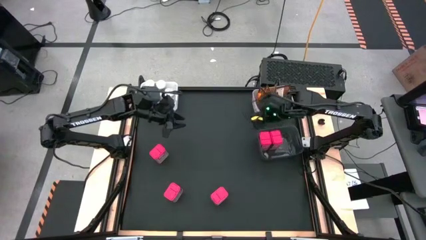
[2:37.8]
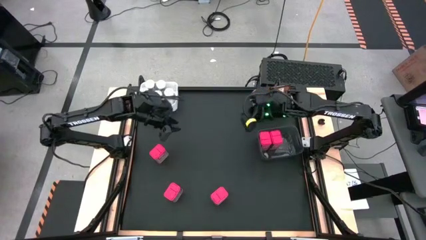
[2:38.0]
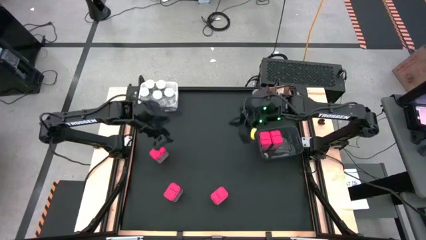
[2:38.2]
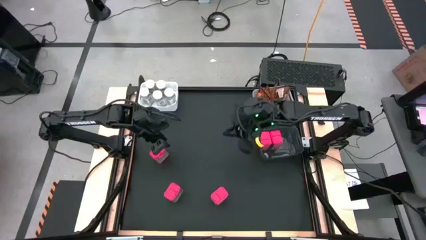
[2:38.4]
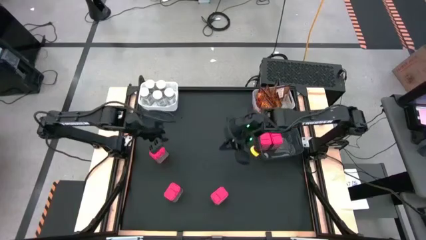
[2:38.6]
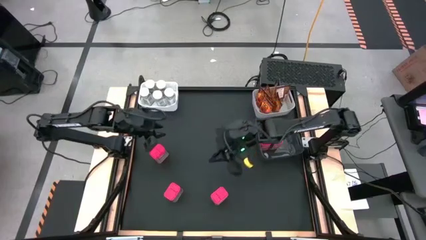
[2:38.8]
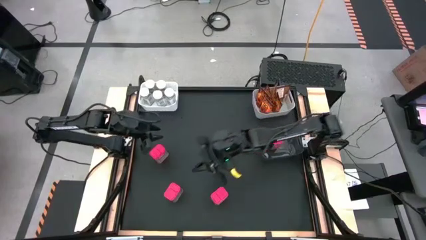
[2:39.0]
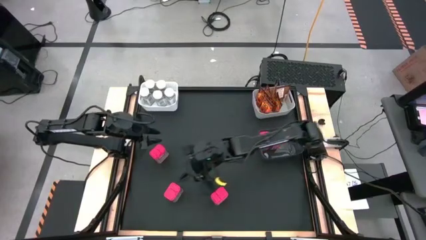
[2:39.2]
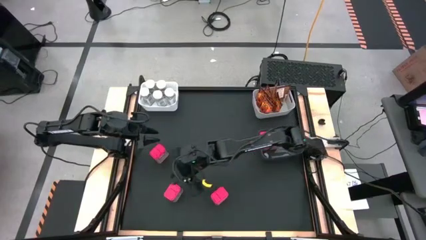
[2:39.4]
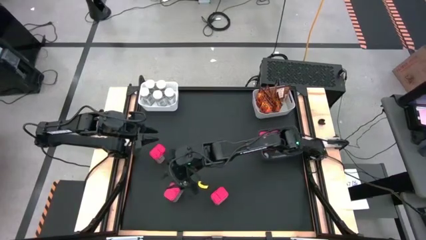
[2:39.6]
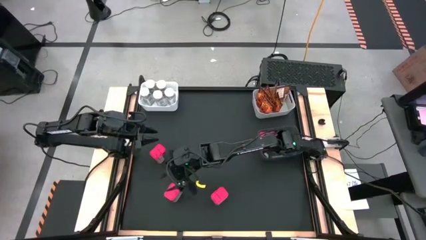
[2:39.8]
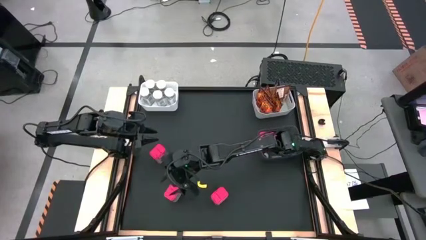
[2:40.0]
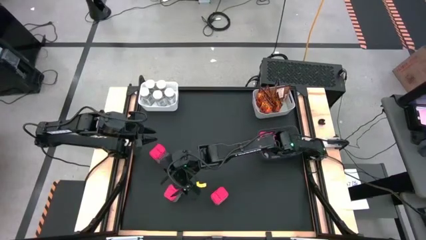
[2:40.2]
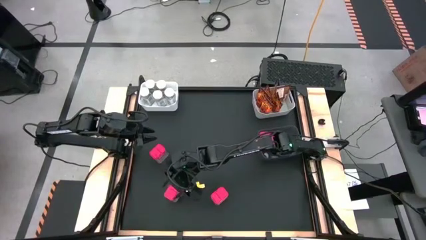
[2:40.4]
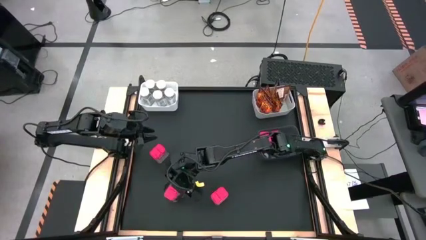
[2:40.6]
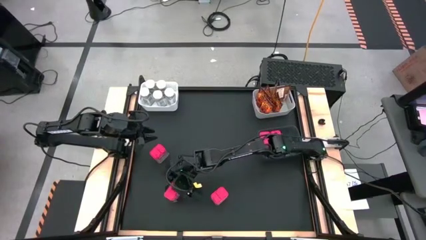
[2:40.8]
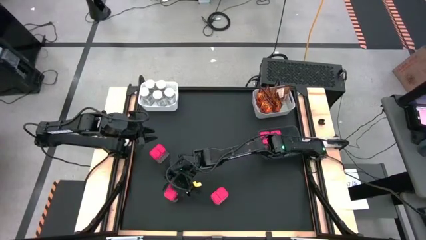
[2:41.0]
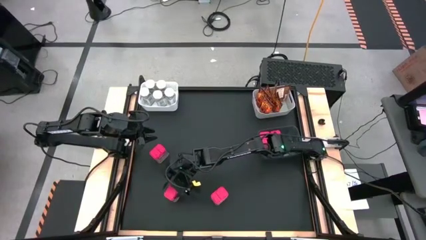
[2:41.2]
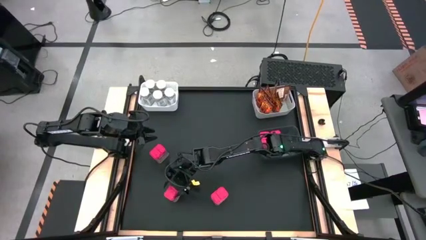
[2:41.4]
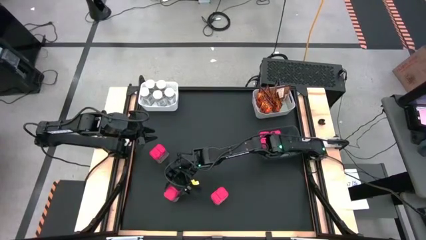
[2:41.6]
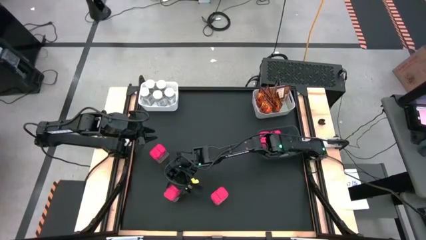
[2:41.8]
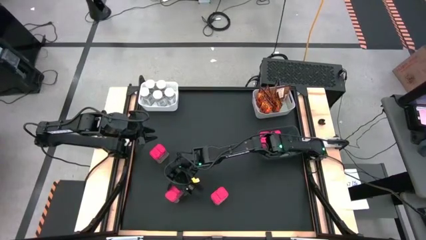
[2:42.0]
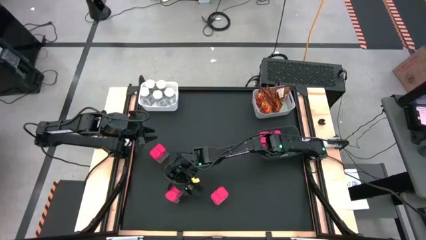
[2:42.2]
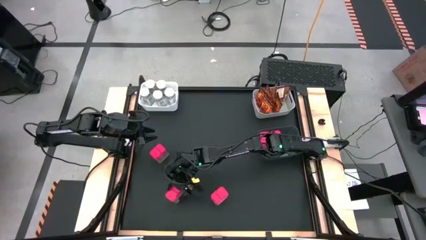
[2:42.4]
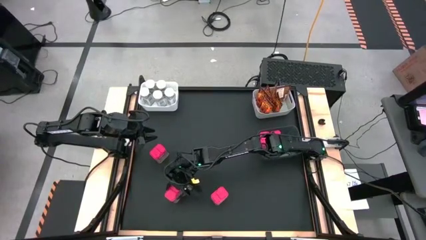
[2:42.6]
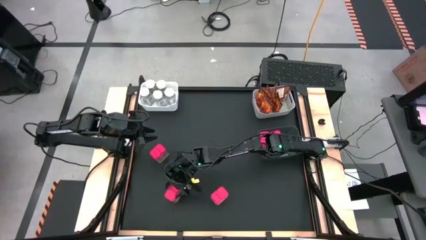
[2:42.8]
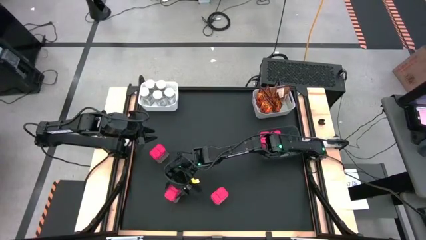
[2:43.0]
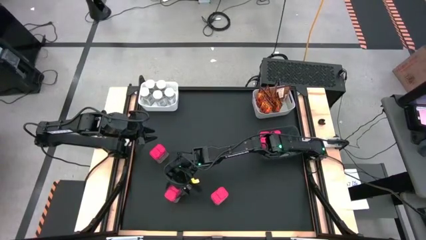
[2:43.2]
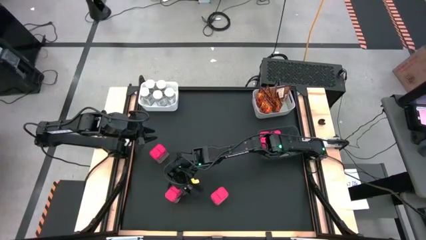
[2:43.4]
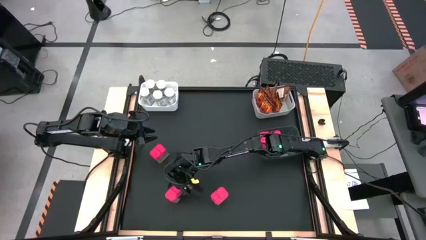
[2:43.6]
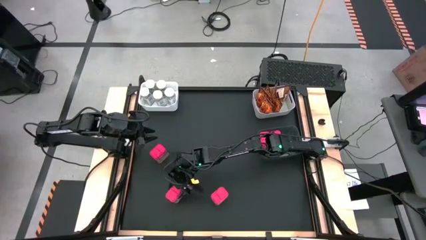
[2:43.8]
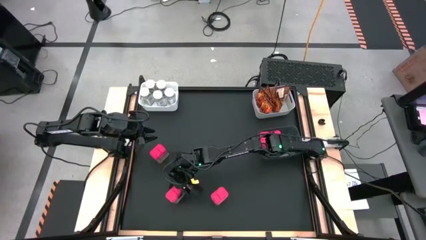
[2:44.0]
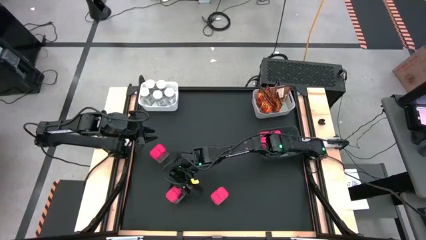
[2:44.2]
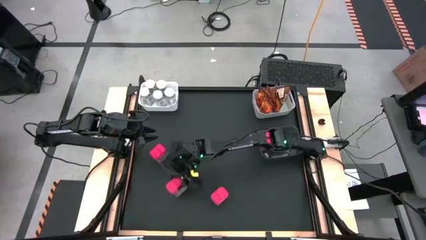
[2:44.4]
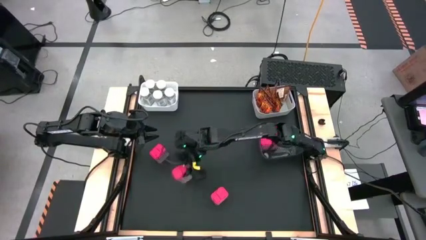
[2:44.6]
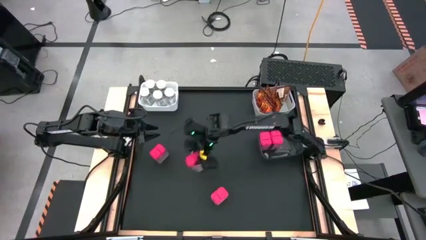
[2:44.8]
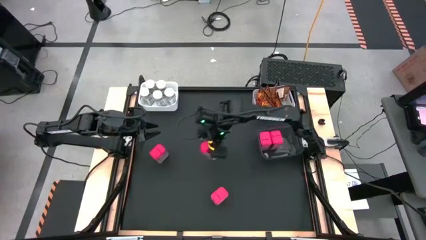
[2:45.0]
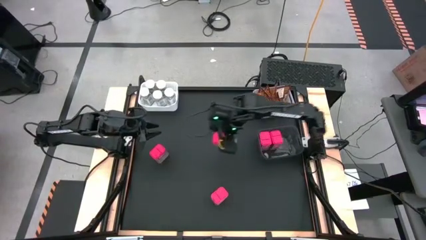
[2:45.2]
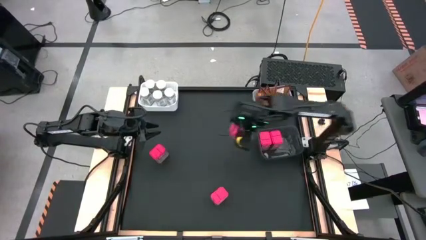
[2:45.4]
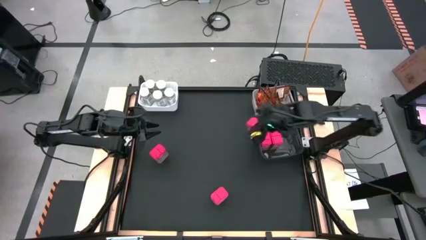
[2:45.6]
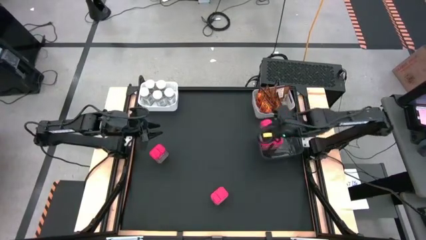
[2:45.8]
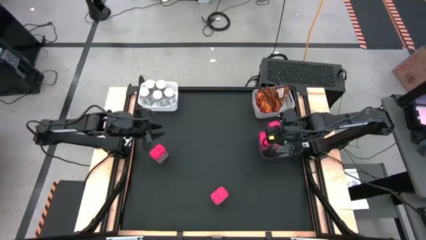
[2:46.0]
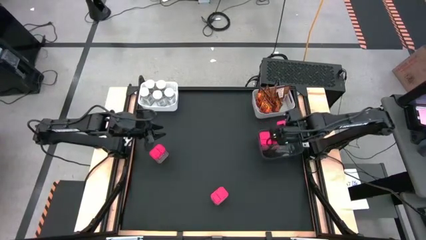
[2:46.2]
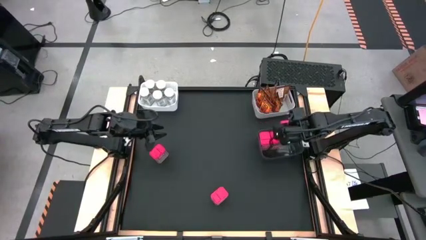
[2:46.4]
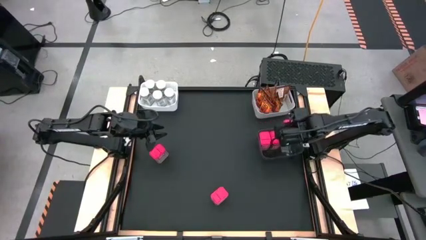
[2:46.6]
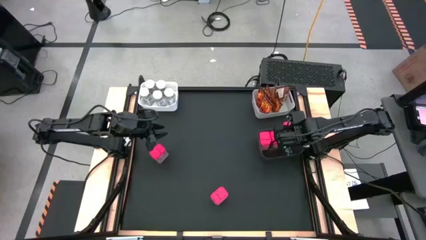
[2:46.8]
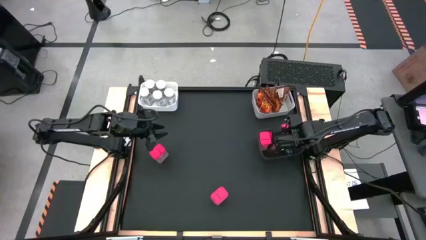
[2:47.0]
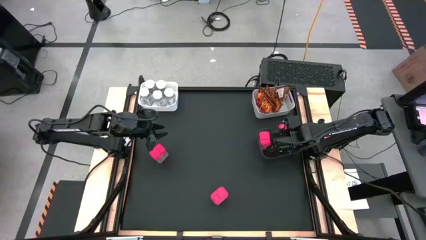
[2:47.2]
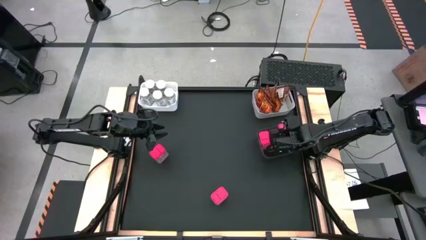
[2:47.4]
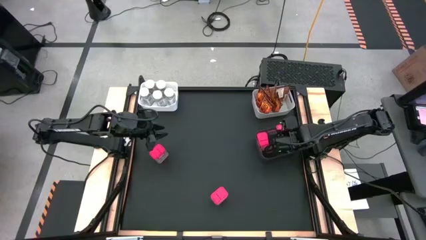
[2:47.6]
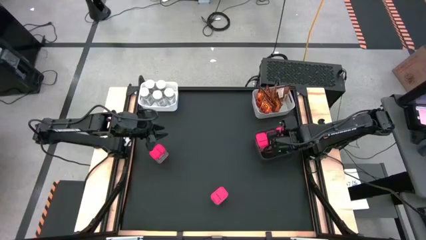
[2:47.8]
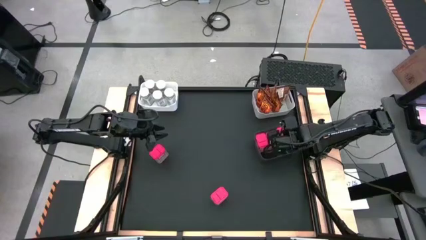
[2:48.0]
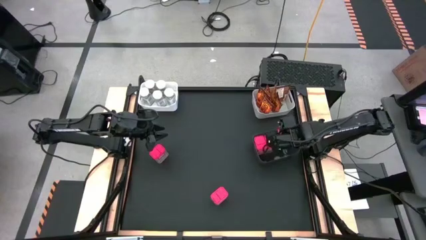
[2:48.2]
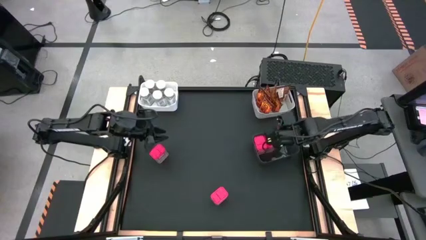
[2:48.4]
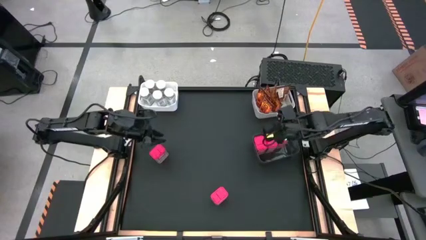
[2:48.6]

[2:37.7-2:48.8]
Task: Sort spices by type
Put the red seasoning can into the black transparent bin

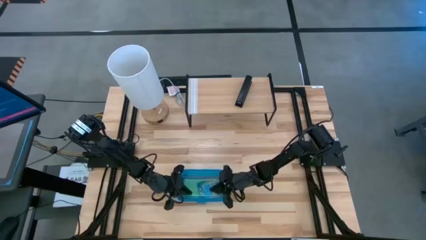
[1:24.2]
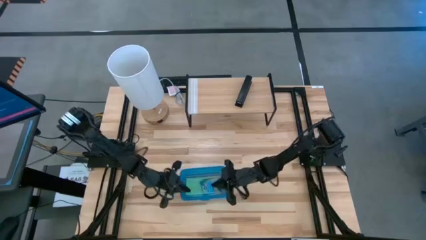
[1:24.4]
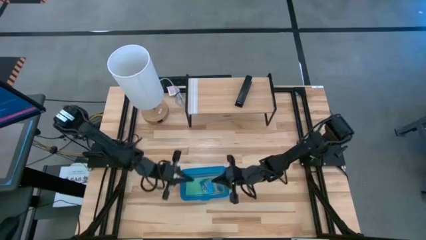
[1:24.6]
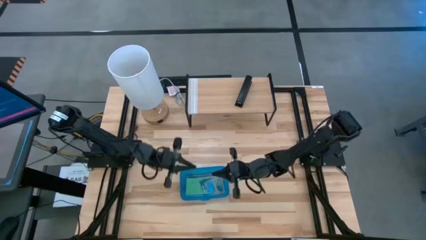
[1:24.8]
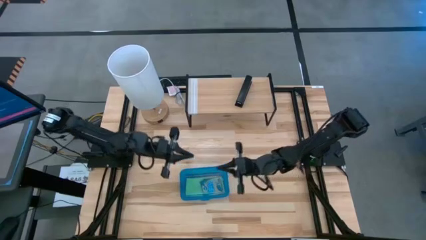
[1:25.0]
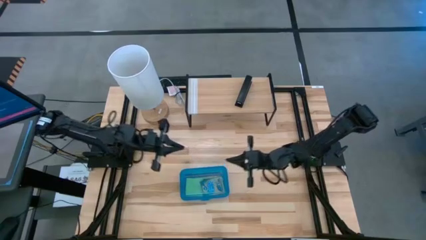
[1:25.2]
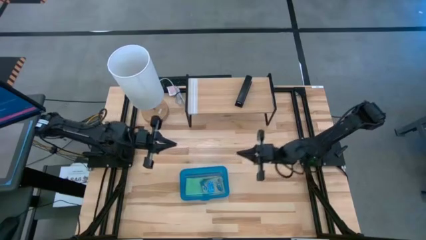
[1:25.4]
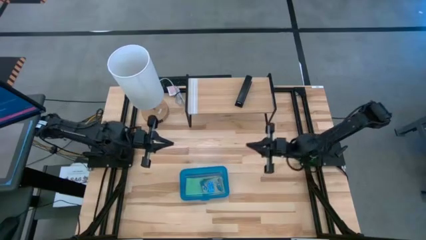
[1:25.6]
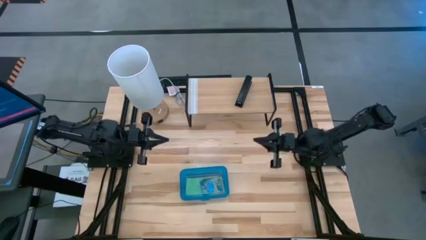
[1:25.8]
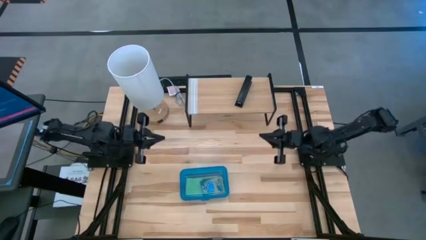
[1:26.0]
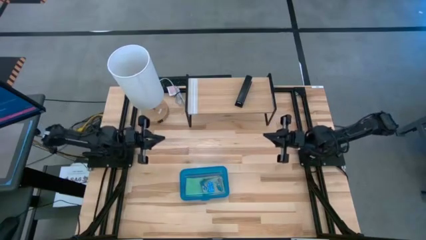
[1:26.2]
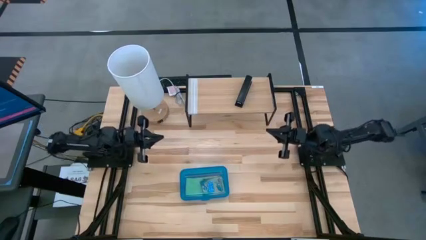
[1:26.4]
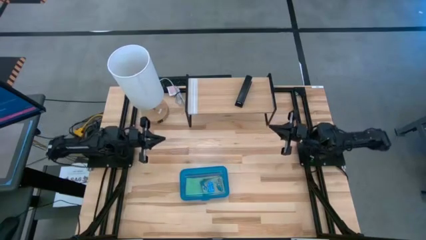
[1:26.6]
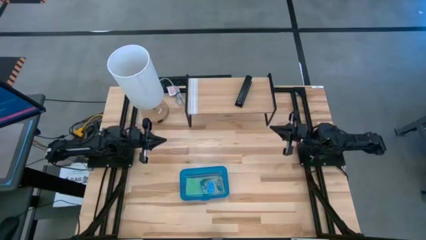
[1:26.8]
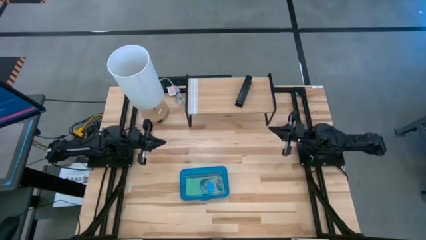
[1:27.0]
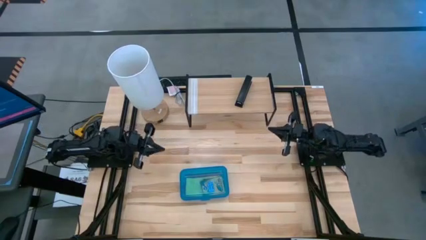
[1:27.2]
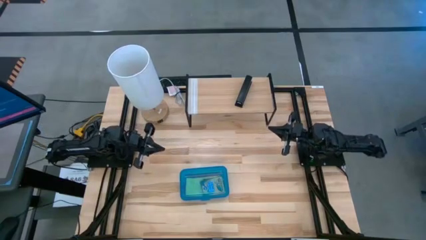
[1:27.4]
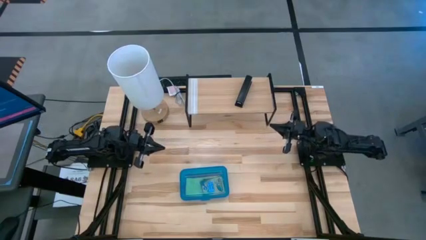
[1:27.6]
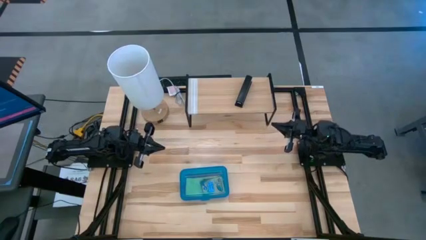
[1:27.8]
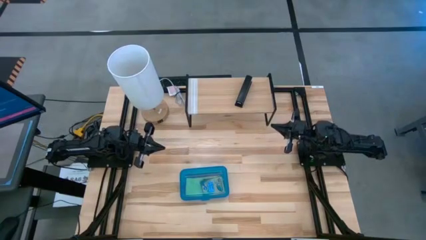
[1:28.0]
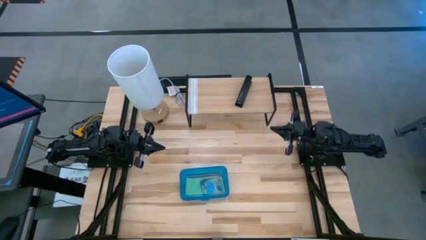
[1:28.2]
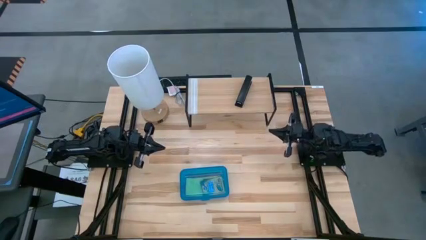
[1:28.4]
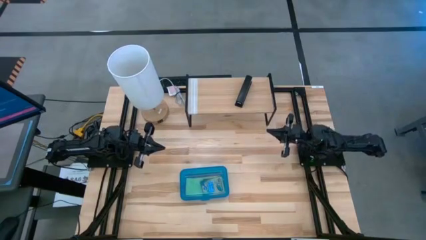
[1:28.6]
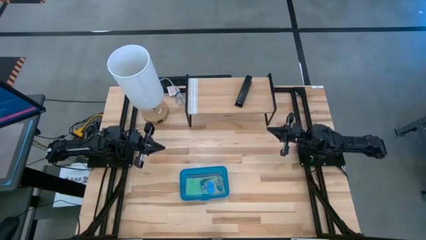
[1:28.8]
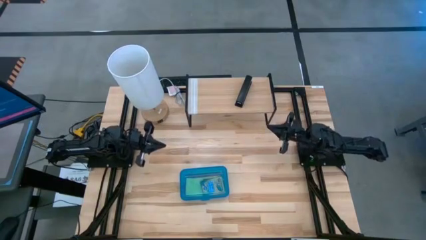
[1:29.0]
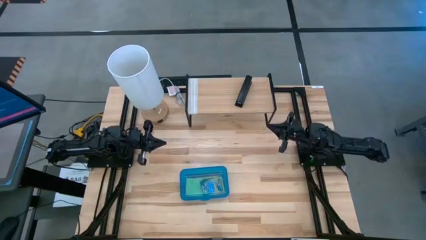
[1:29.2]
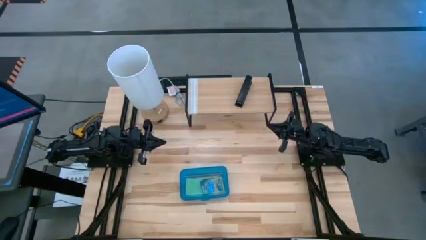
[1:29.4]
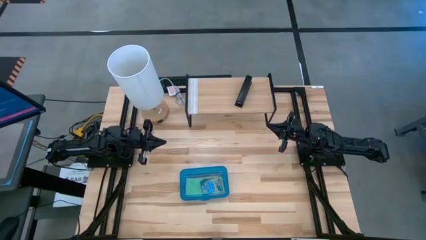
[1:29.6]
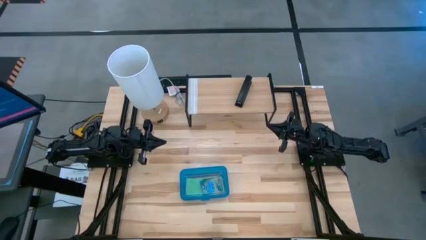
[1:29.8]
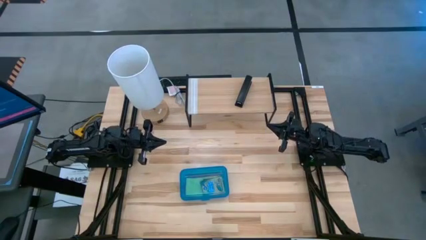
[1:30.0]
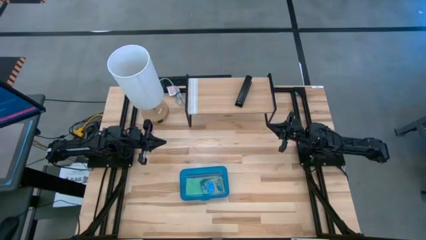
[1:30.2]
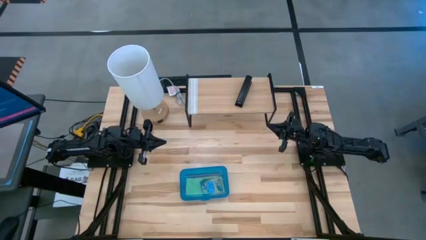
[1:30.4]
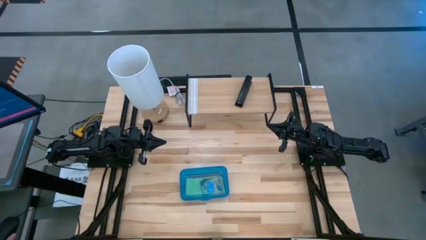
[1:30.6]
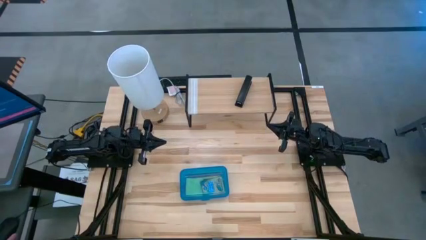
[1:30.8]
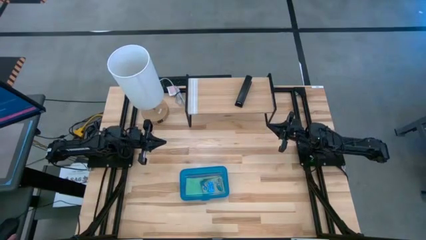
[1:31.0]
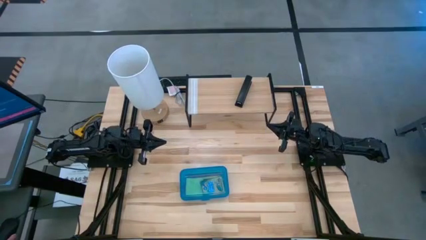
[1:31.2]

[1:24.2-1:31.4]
Task: Pack school essentials
Return to Home Position
